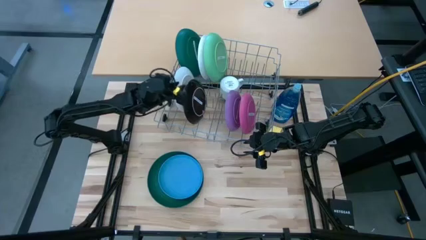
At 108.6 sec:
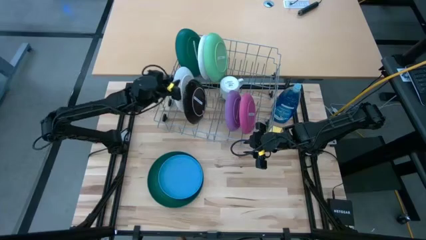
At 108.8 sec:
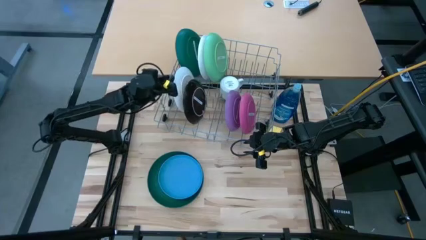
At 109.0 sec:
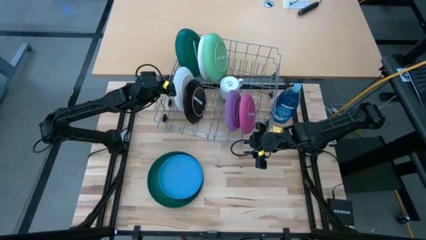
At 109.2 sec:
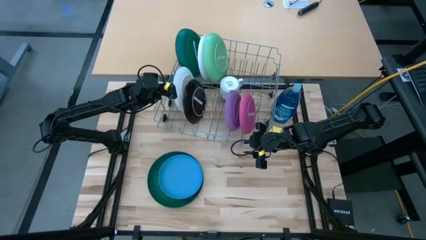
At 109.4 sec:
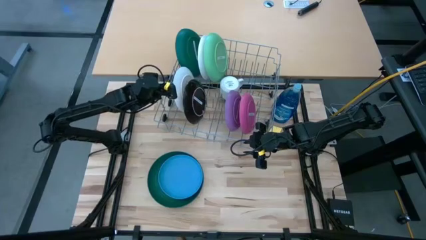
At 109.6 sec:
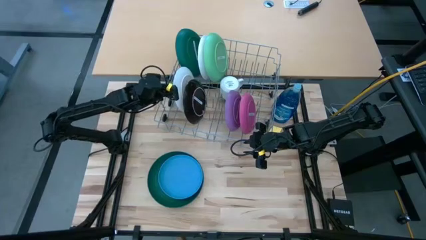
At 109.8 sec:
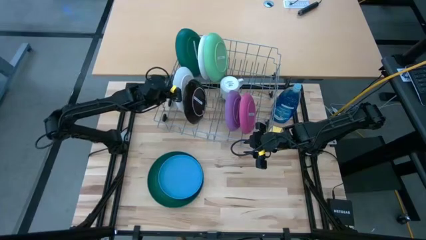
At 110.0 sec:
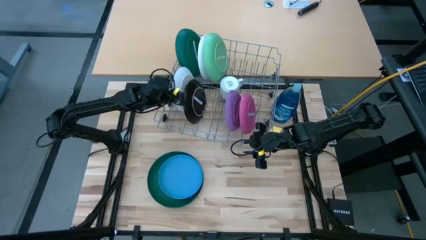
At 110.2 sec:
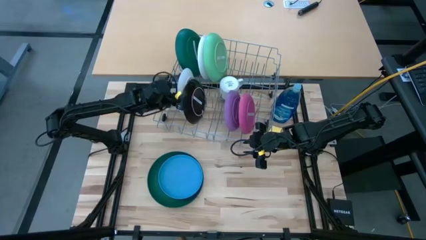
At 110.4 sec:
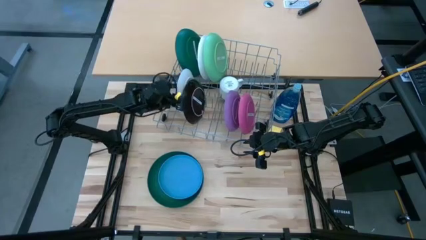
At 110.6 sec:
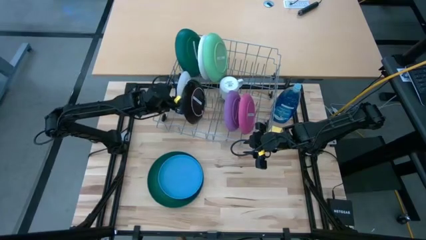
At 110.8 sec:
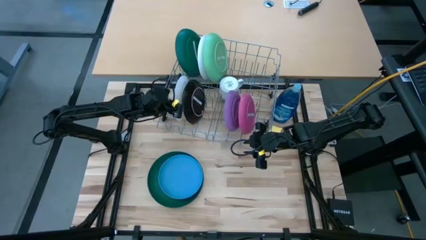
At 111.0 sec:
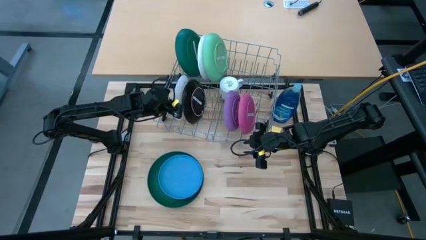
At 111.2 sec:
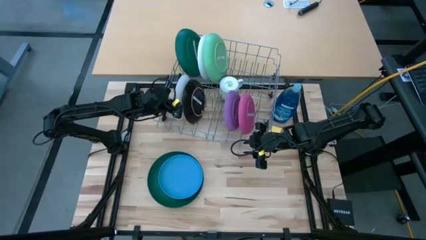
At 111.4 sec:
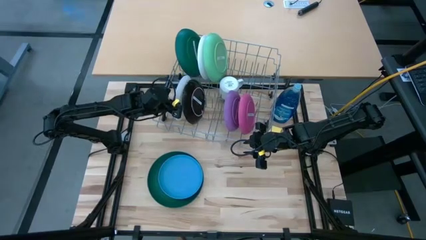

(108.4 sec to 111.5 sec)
Task: Sort dishes
Adjust the blue patterned plate in the dish rack

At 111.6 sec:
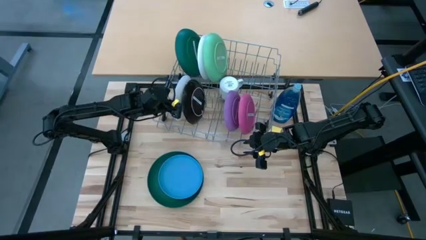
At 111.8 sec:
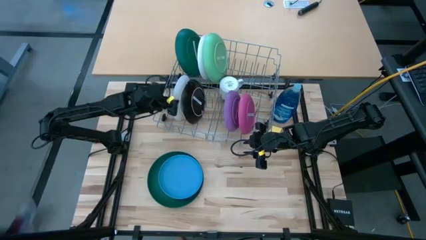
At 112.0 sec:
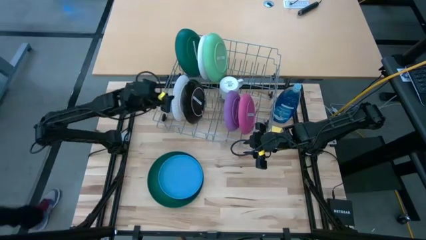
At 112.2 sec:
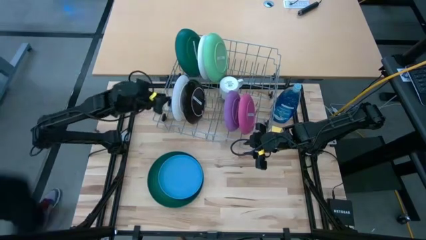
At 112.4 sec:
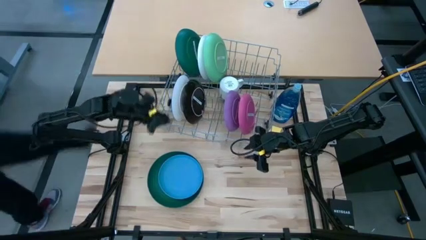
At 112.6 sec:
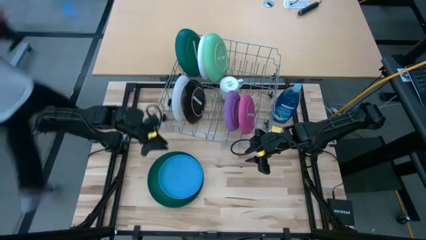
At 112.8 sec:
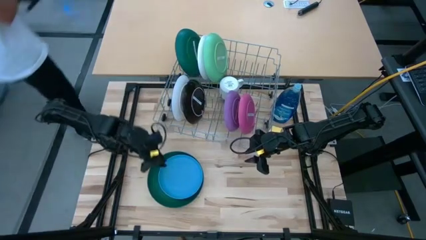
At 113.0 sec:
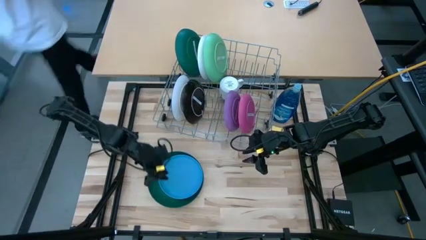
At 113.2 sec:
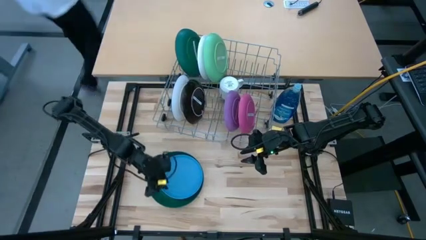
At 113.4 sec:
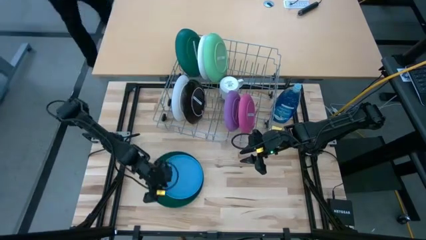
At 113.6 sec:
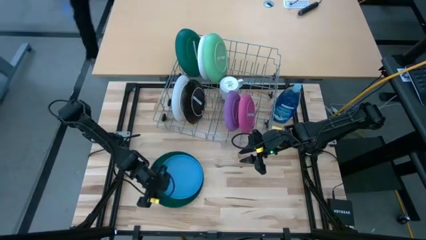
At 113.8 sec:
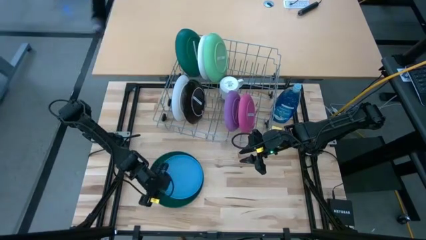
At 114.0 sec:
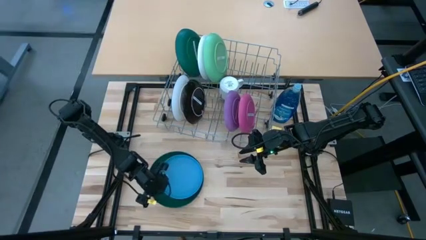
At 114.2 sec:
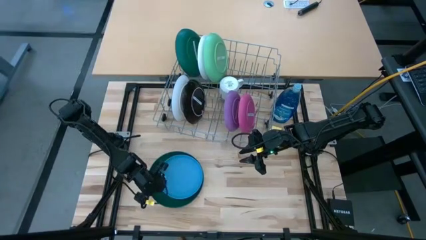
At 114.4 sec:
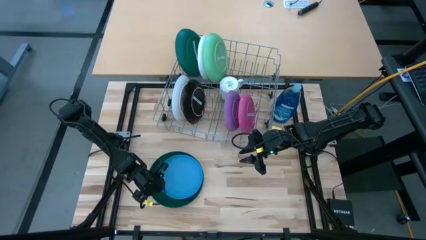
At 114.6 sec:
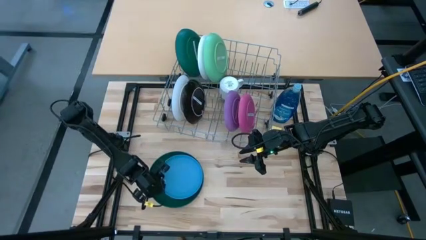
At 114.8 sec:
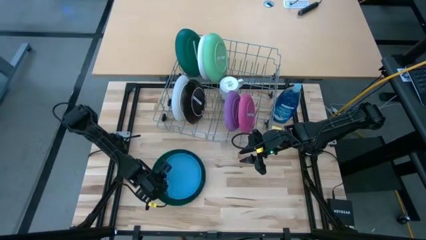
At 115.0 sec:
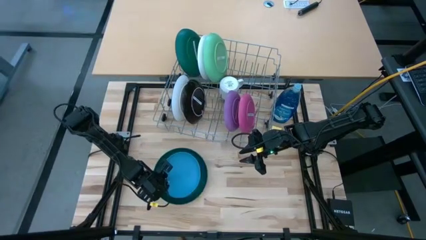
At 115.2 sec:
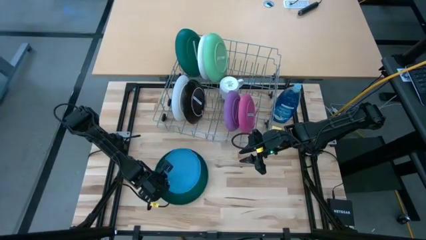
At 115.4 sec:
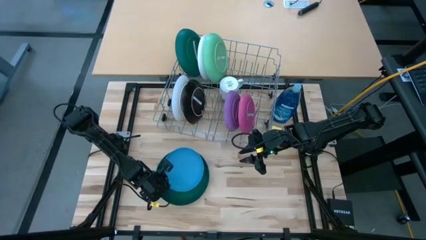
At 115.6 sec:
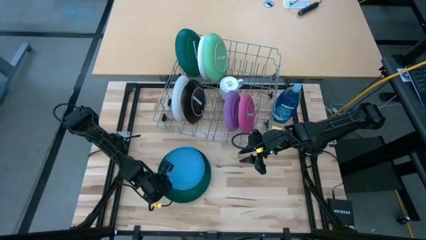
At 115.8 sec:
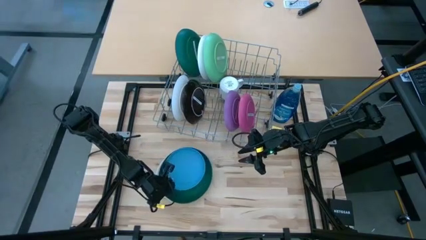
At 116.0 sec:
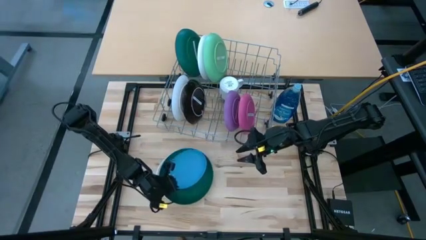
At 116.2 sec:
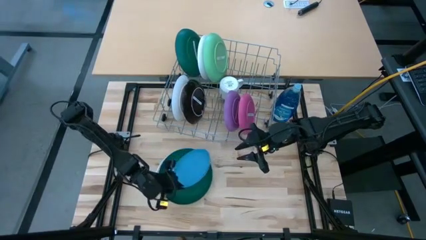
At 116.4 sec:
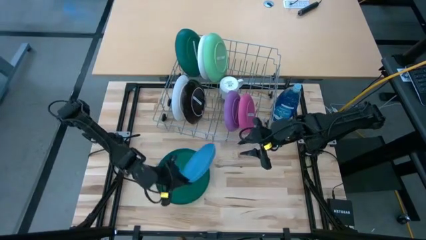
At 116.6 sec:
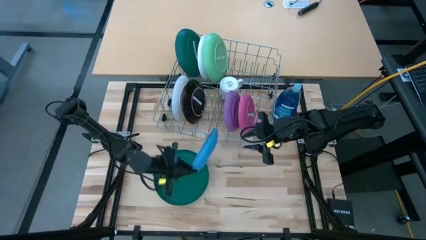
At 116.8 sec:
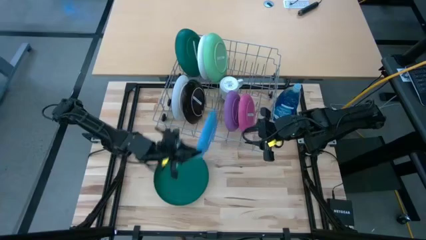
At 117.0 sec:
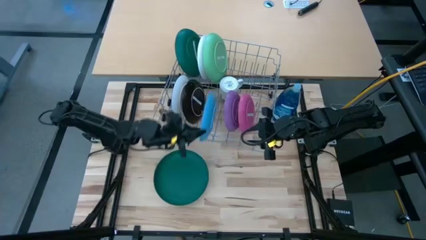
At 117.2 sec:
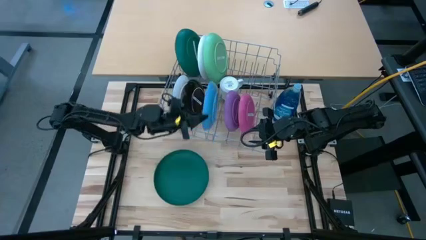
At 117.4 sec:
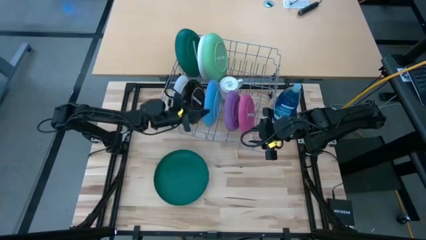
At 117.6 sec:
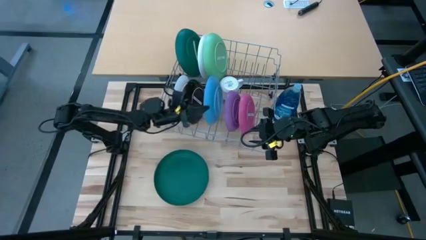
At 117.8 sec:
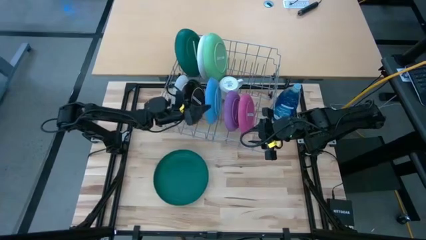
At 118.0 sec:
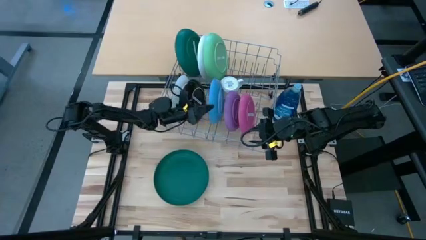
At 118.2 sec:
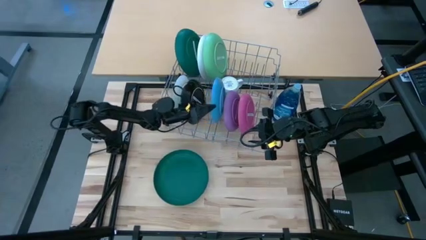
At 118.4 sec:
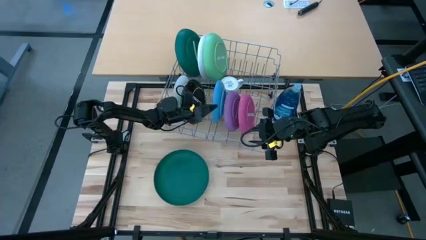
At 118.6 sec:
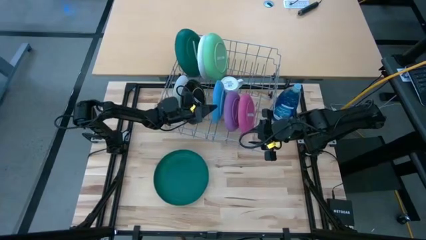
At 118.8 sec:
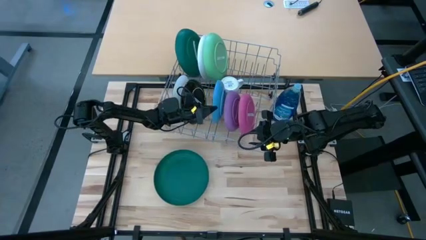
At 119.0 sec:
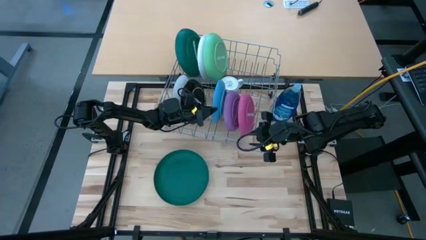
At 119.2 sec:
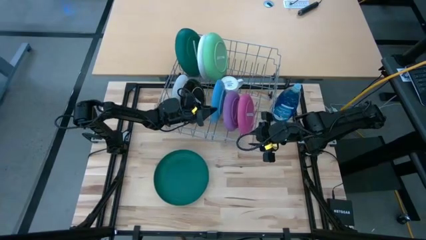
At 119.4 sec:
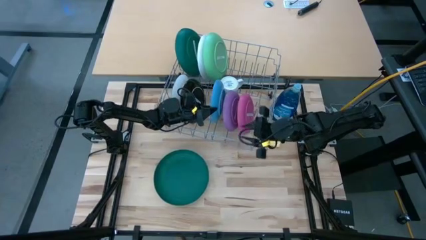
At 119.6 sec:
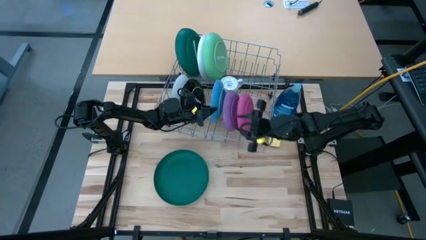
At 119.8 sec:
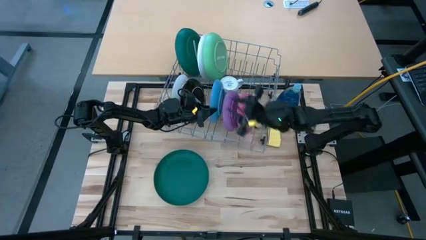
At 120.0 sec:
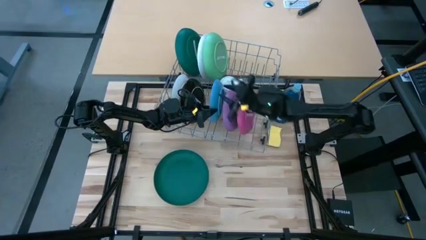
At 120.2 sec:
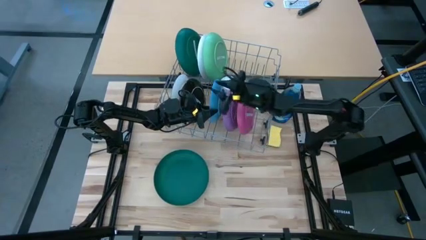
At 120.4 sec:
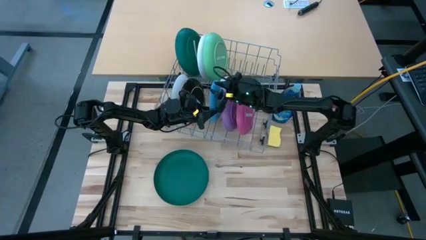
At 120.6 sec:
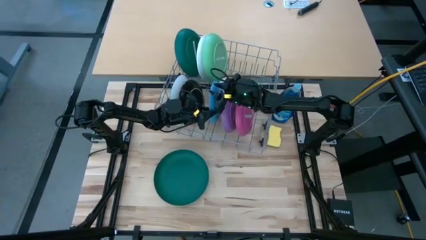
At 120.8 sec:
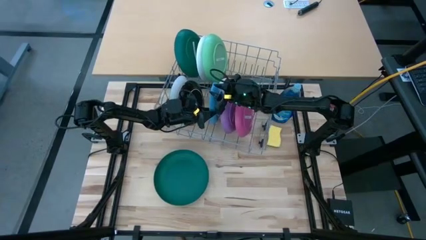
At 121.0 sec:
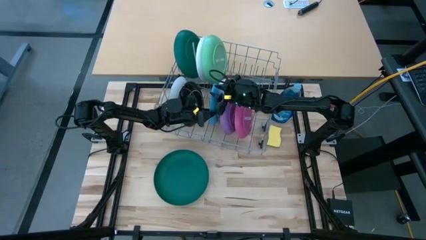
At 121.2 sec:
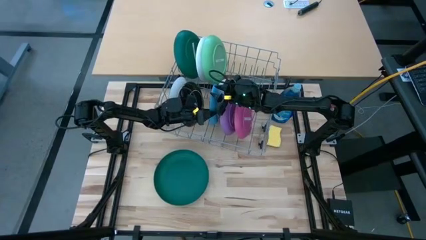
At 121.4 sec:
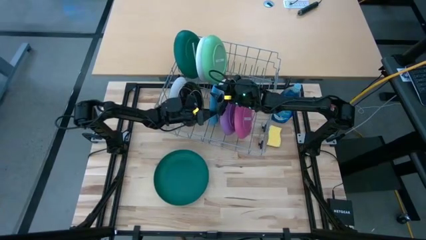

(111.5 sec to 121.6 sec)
Put the light blue plate in the dish rack

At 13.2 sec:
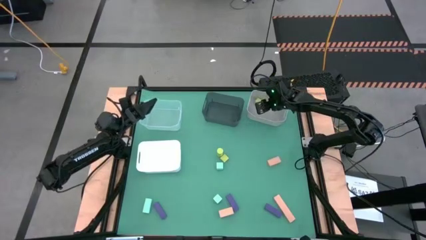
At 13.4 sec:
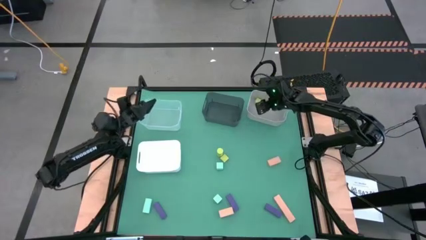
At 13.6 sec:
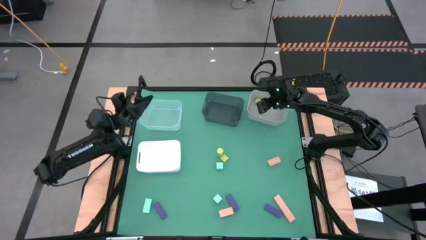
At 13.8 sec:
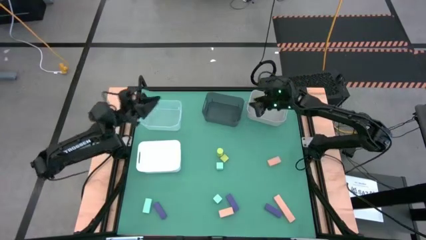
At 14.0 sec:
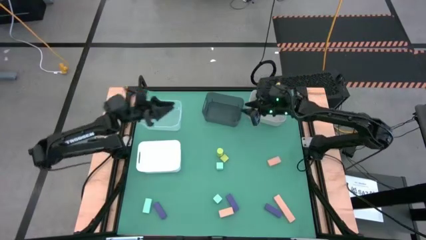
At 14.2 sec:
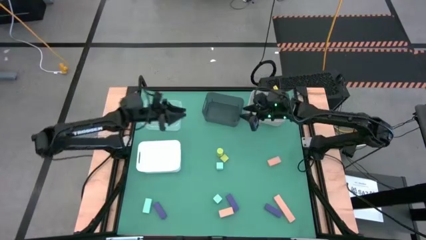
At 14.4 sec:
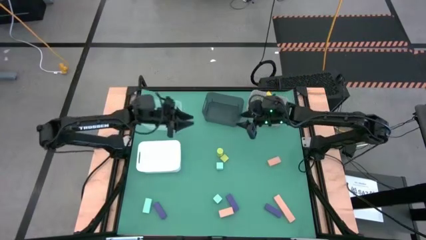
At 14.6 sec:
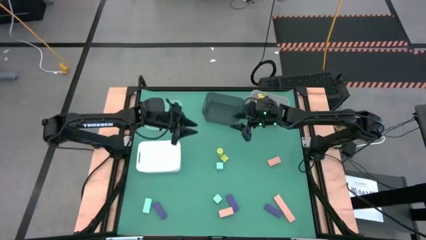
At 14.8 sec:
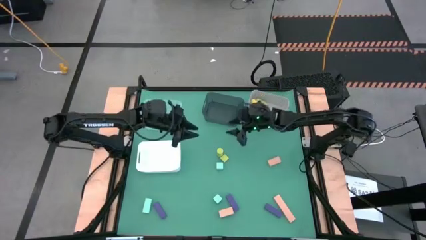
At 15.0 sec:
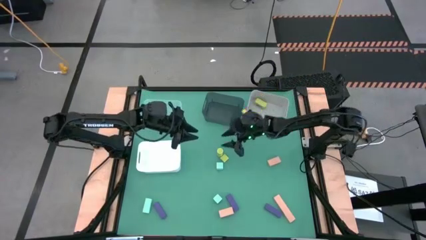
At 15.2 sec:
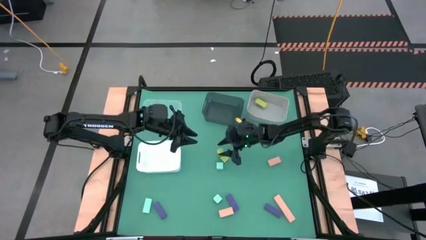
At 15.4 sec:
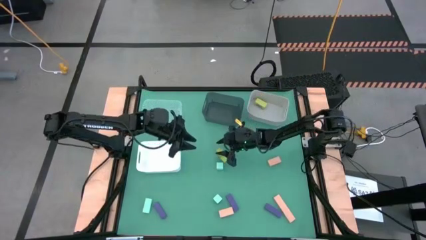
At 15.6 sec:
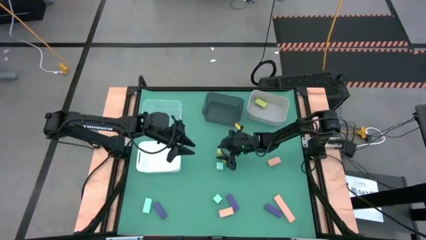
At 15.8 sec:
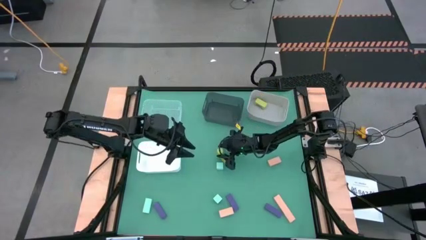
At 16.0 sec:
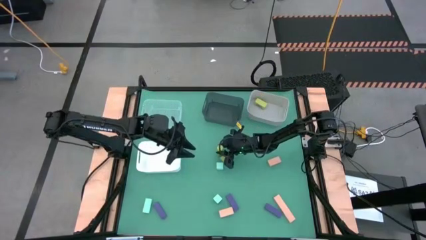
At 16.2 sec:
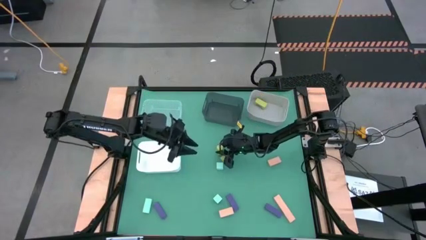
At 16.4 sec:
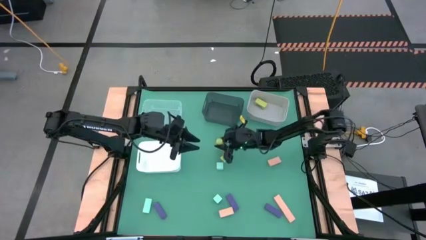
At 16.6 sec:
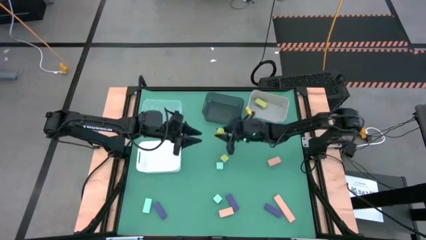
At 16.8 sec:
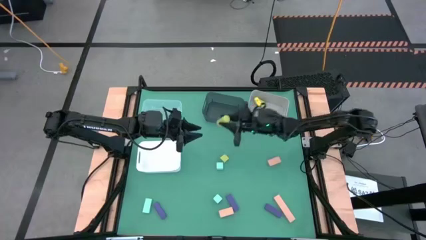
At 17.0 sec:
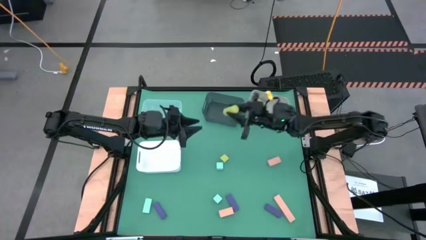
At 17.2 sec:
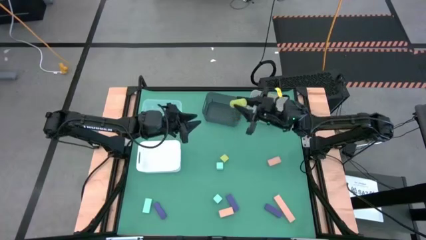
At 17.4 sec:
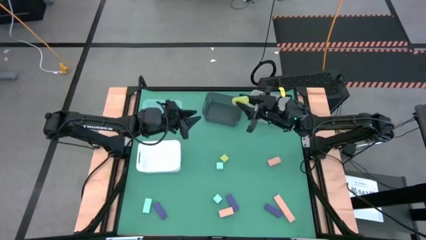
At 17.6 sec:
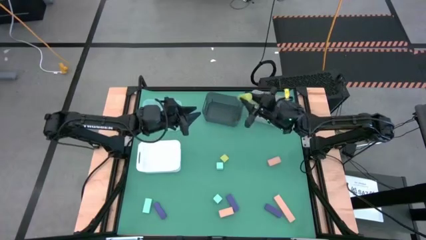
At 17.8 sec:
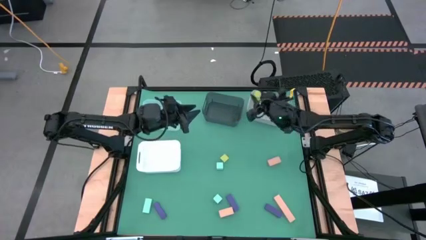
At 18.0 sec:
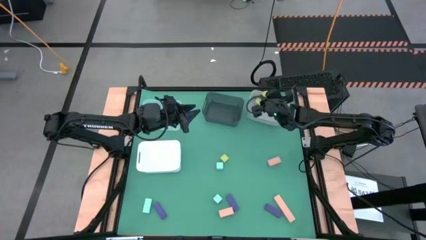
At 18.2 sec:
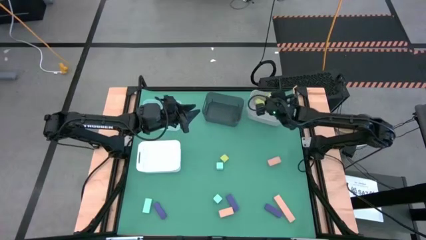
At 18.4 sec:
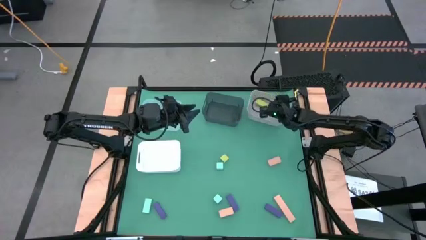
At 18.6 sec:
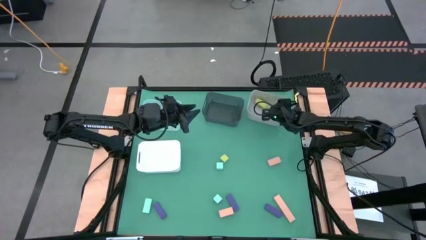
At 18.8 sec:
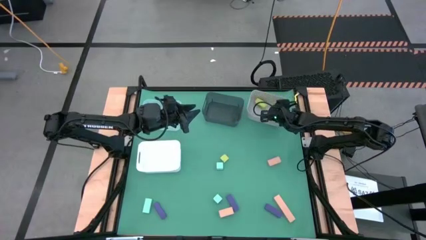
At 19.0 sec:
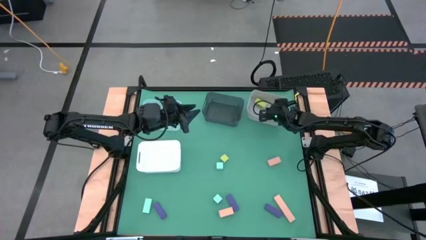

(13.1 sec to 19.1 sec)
Task: Sort & place blocks by color
Put the left green block into the gray bin
